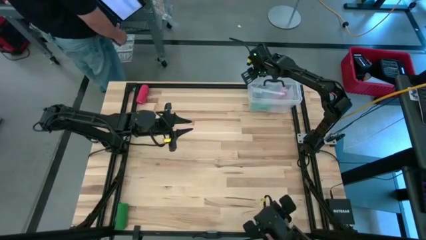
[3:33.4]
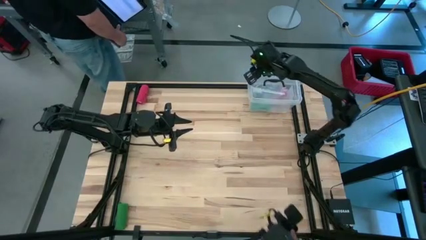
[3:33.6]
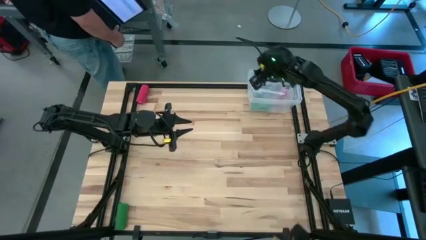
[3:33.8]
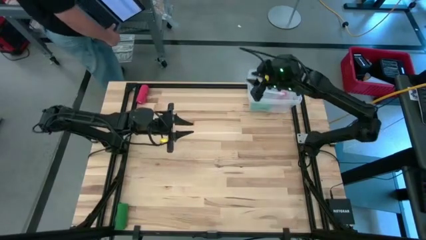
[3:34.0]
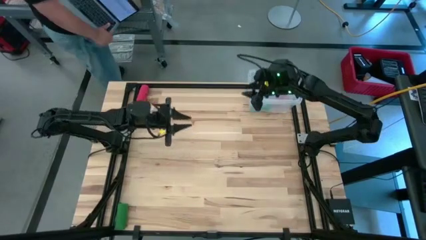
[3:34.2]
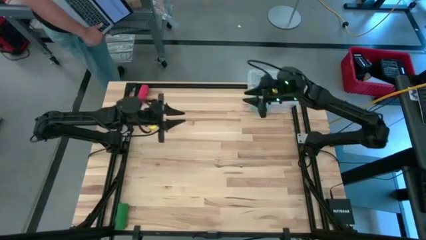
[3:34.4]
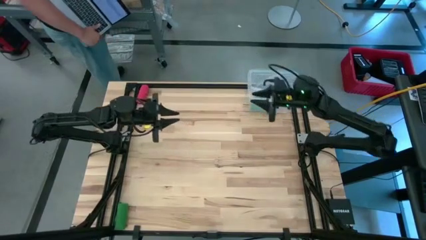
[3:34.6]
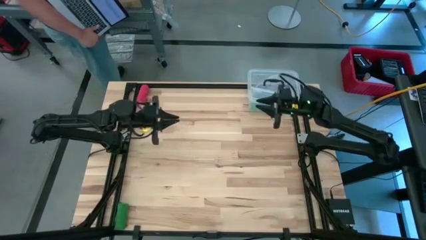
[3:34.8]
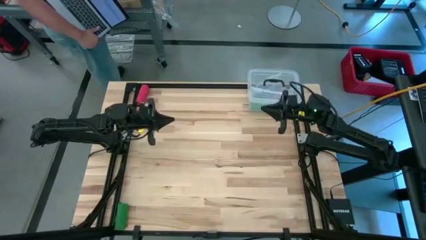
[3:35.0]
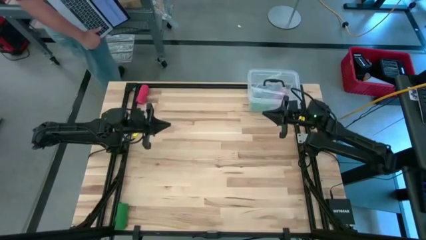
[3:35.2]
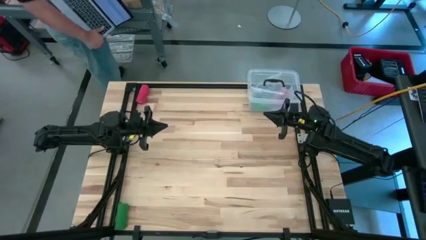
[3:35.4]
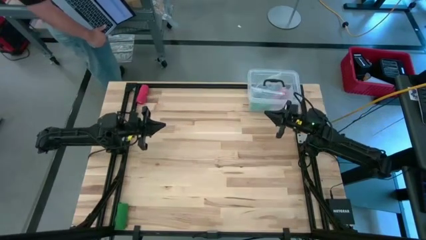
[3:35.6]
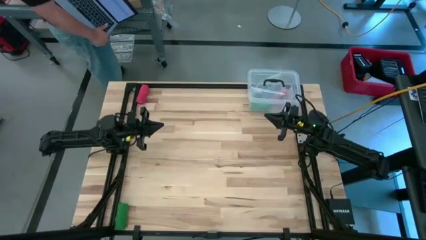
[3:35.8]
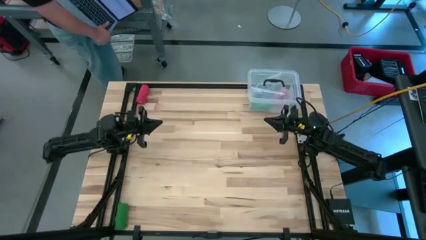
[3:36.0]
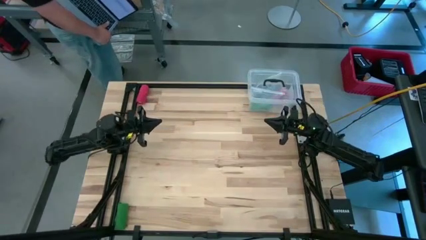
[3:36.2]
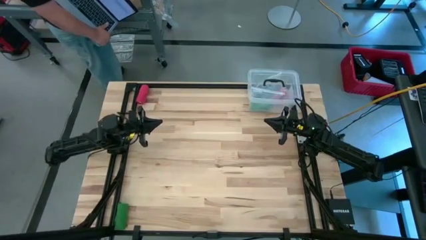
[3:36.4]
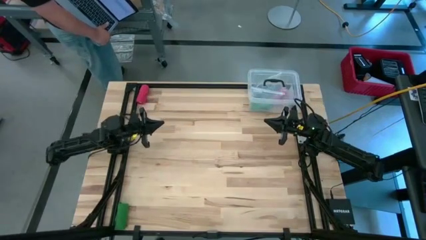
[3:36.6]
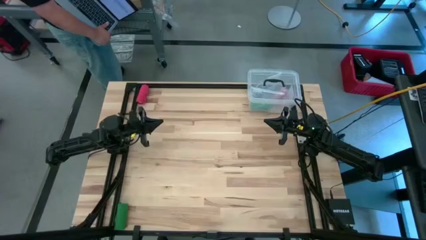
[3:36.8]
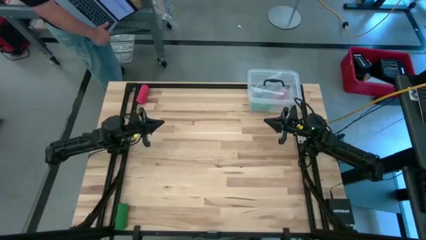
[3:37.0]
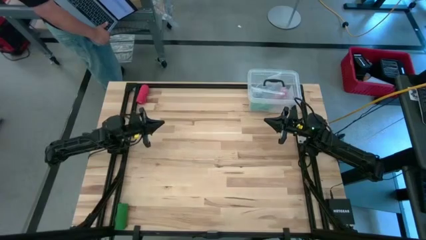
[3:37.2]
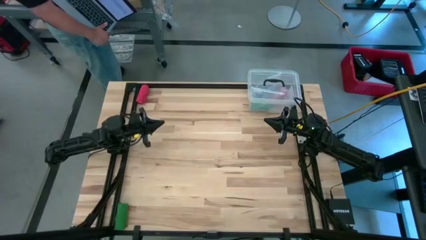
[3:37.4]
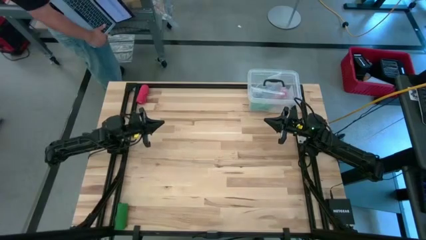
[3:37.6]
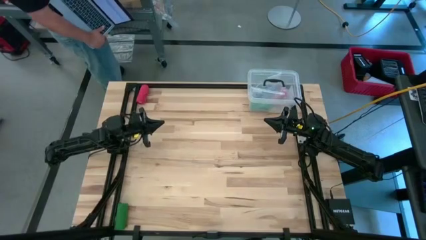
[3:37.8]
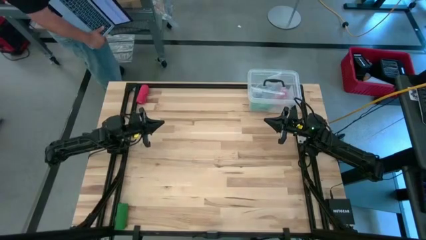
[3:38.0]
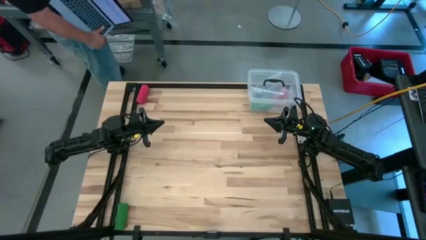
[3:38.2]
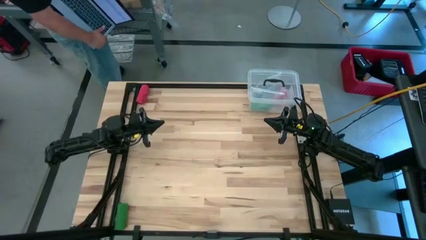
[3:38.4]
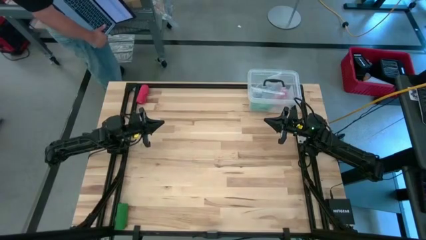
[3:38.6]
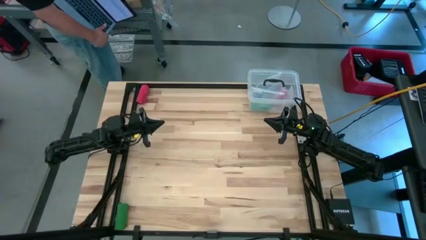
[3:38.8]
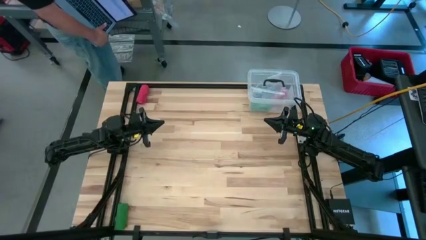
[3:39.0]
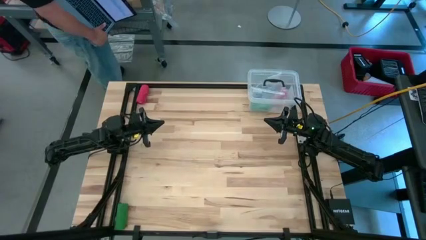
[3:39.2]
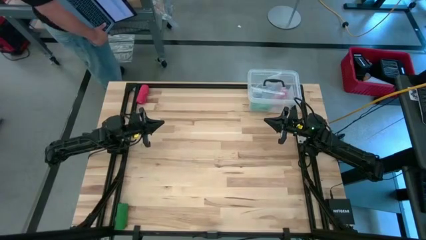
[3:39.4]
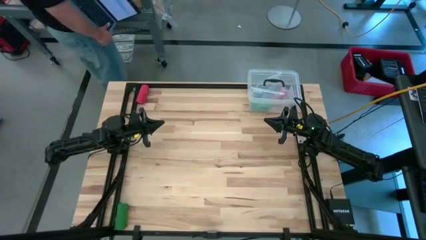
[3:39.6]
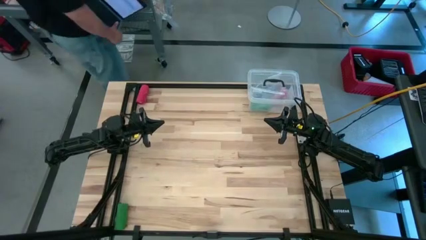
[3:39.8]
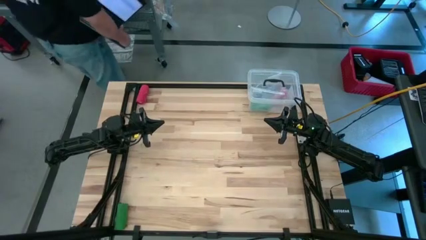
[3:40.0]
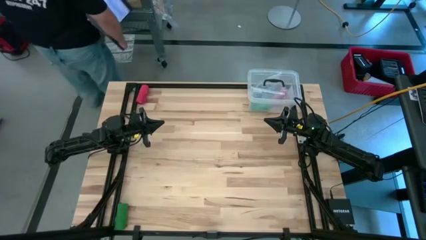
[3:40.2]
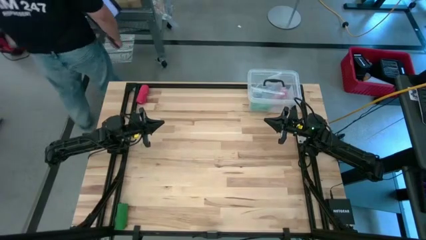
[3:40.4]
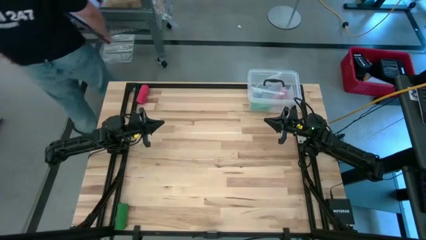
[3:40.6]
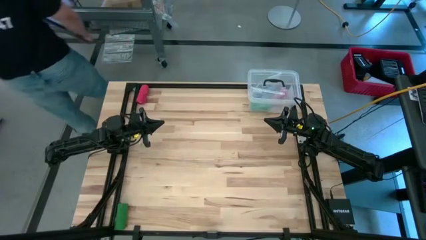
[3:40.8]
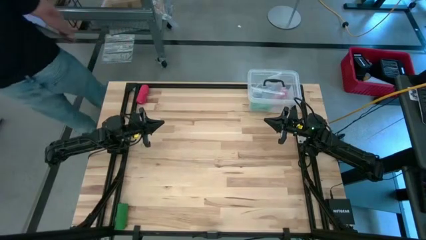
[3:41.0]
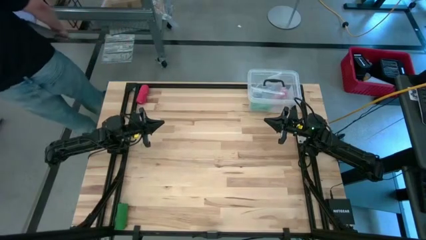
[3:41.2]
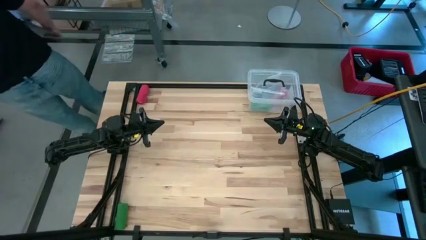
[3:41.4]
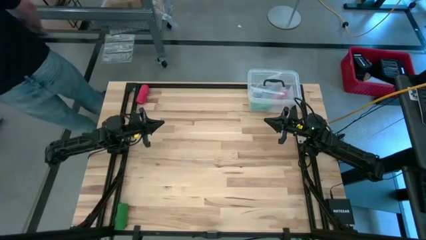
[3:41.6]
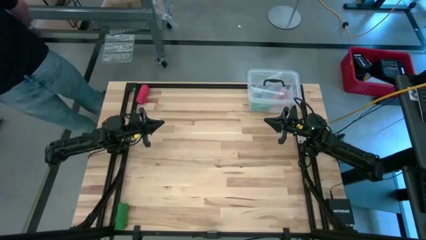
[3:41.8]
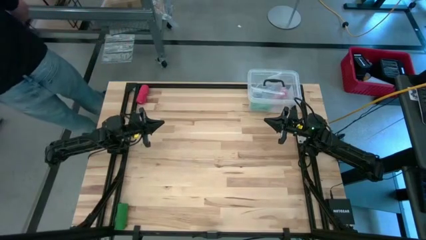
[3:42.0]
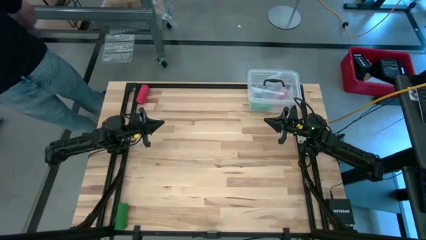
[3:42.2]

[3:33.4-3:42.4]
Task: Roll bandage
Return to Home Position

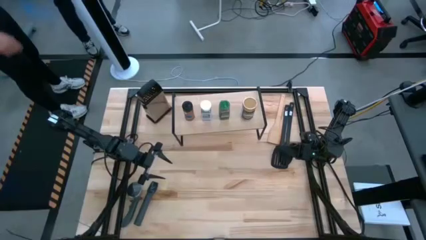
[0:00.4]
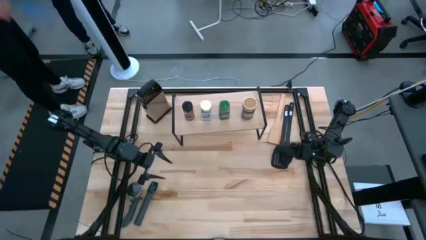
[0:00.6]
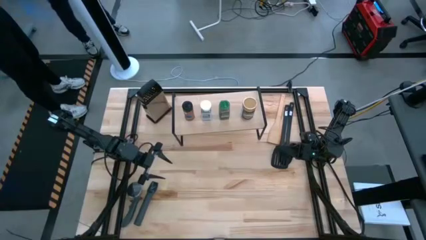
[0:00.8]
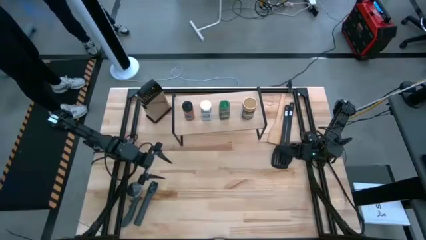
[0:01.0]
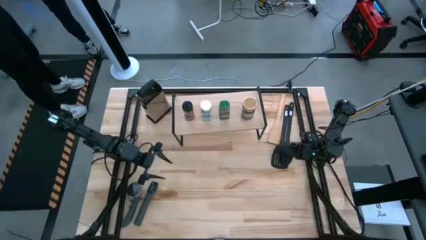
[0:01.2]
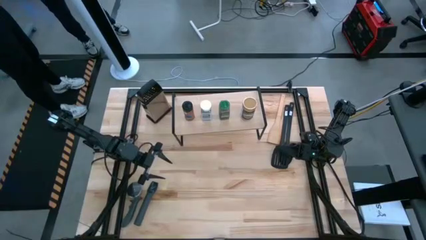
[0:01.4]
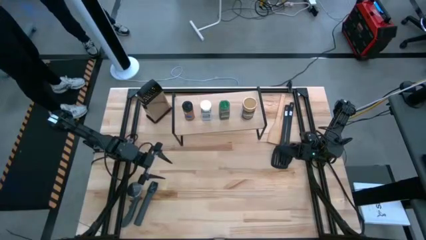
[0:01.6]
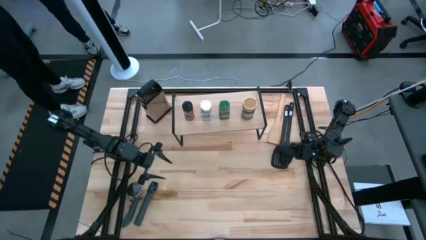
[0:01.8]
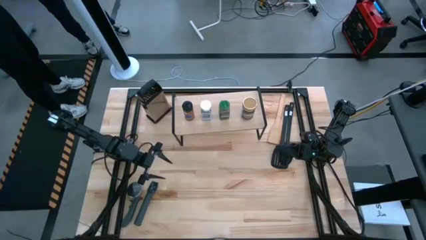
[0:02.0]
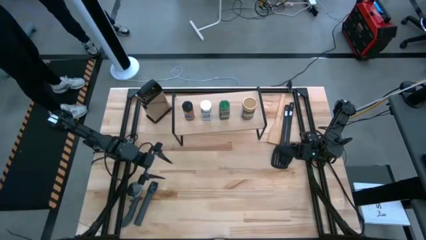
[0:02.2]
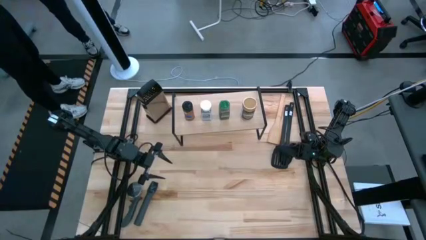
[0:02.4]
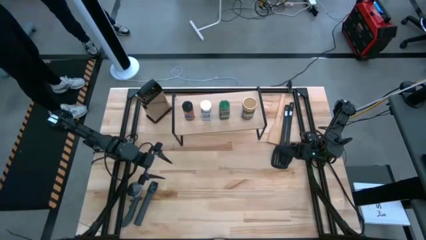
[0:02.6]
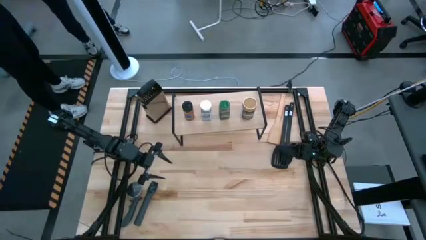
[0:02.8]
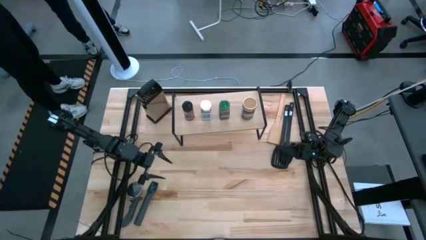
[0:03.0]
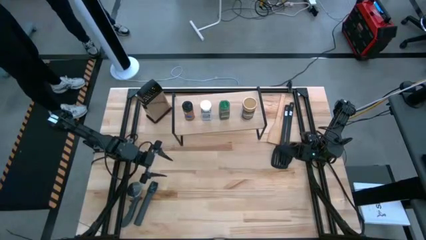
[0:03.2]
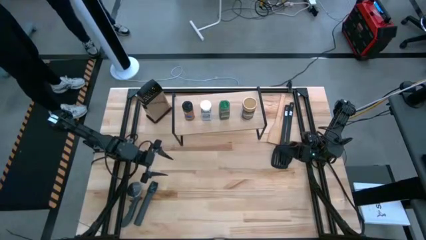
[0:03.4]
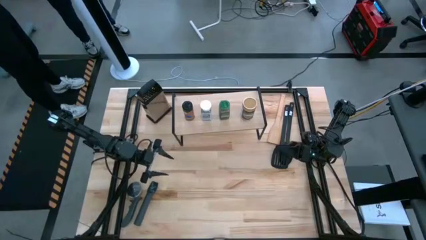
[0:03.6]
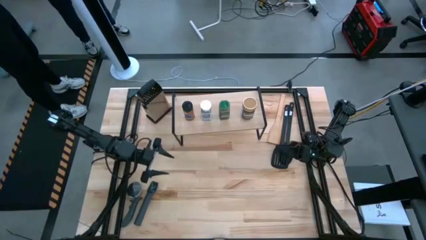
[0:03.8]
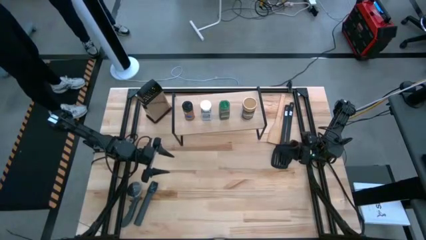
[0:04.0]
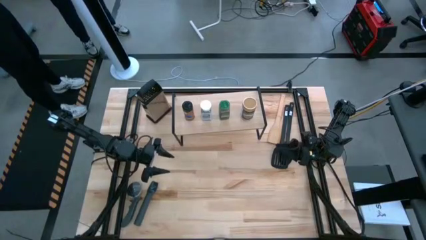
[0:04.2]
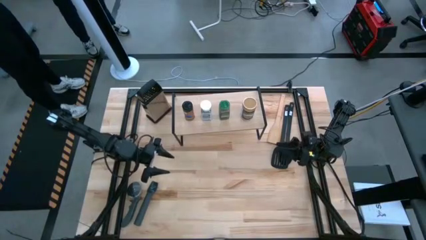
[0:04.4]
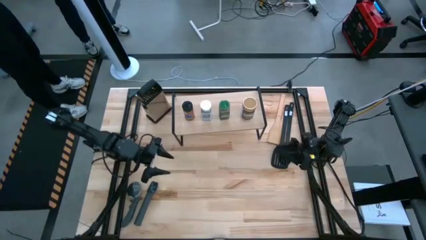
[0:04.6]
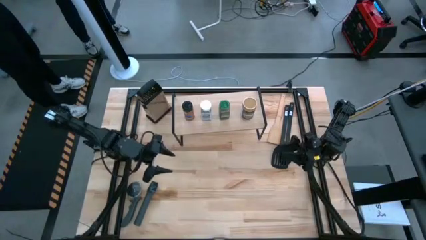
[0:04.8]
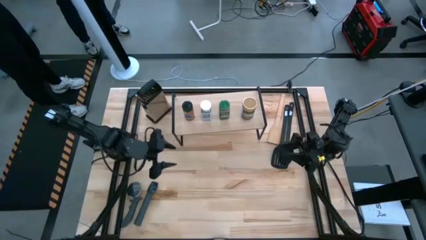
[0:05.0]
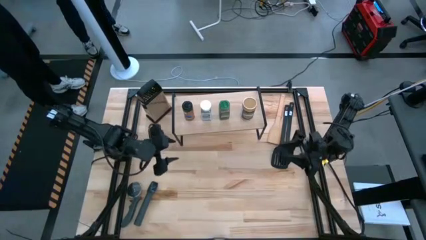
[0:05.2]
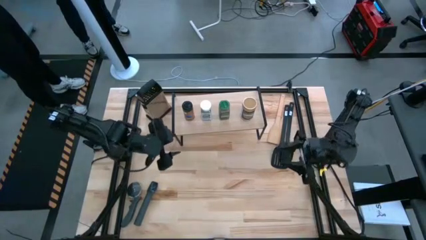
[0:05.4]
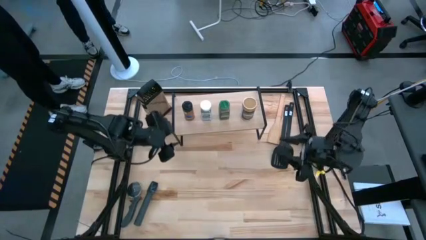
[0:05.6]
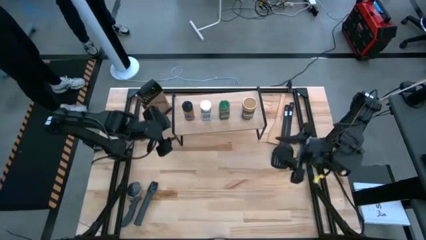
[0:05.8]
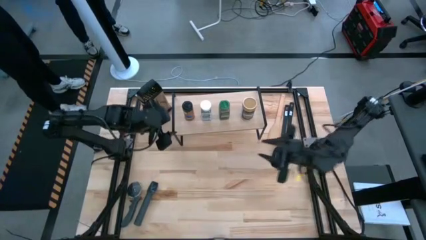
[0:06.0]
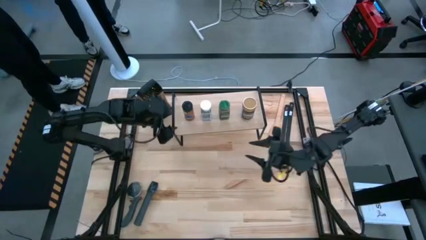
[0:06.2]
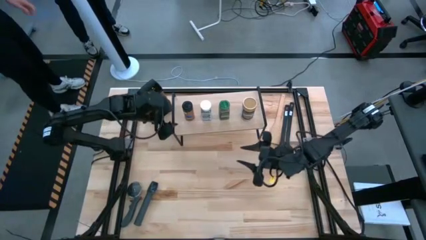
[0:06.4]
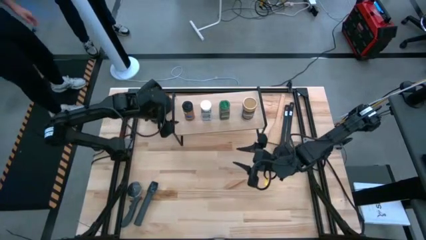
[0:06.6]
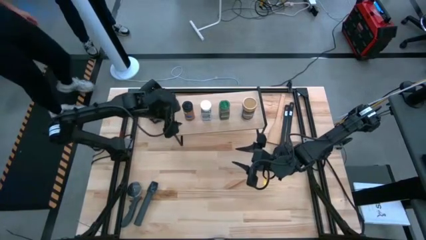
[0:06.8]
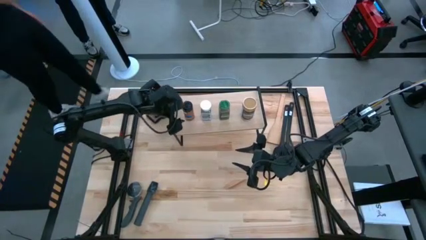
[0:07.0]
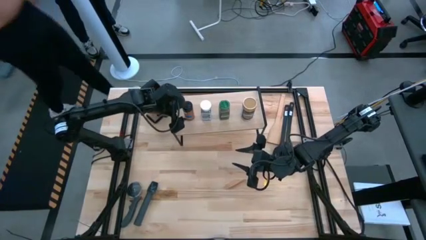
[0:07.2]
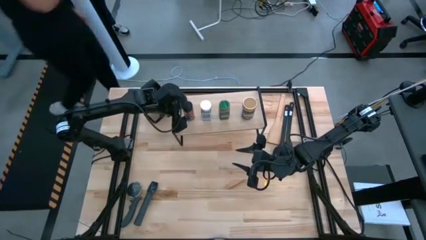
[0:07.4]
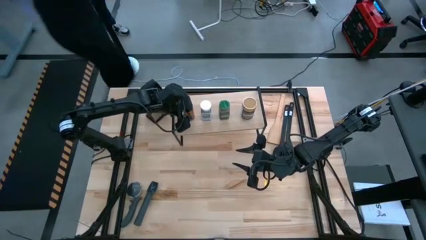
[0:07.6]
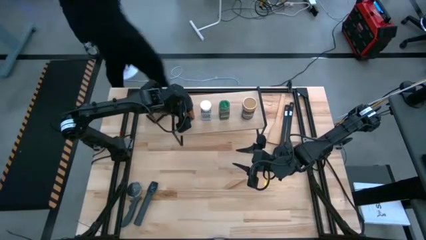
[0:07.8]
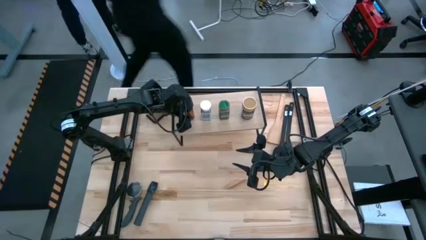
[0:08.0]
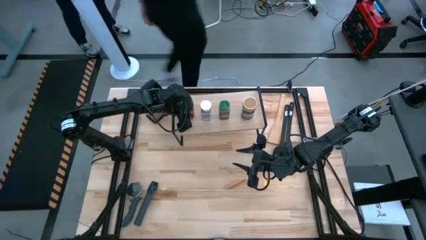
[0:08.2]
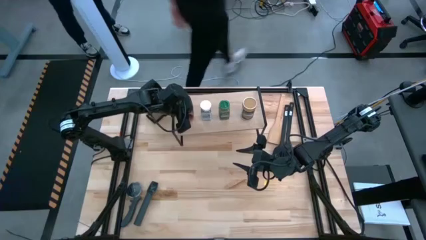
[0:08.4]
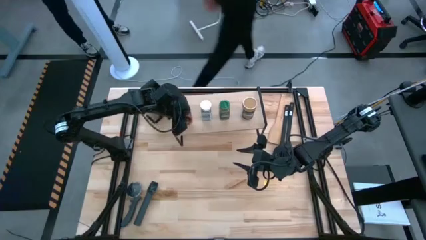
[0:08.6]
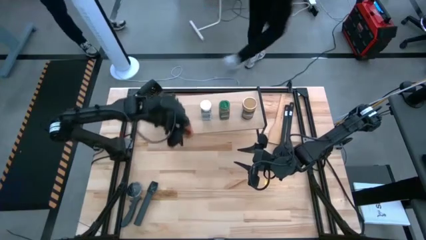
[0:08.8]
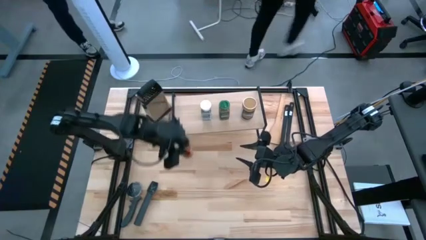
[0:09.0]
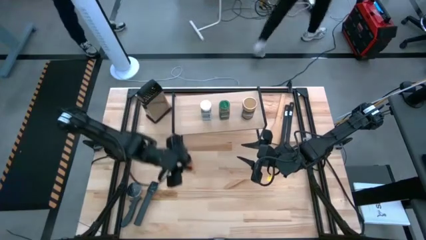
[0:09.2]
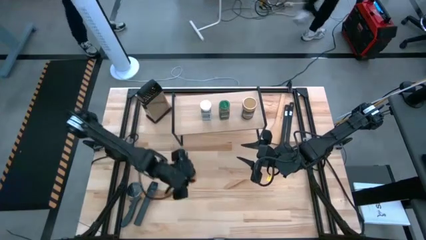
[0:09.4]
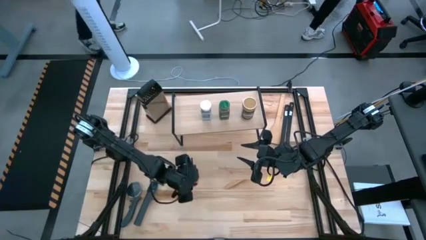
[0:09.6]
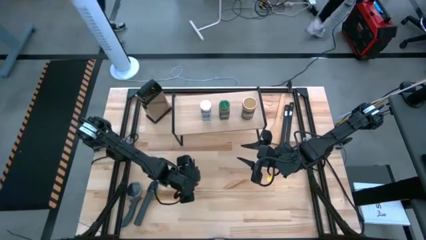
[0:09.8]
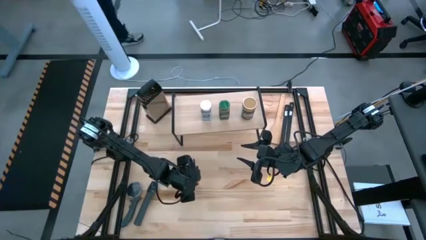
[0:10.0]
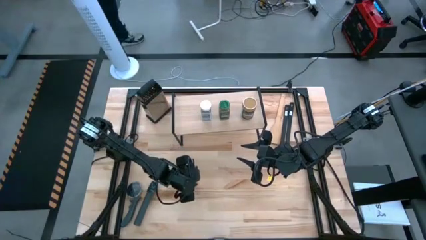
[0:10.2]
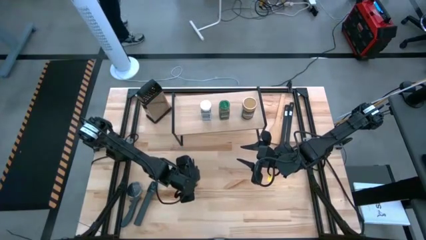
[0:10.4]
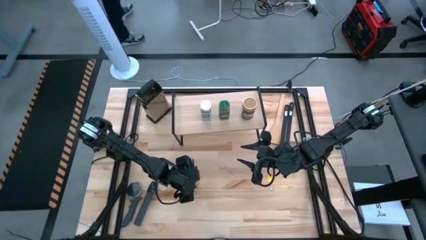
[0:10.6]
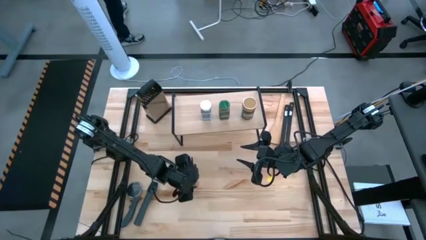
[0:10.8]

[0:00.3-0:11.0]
Task: Shelf spices
Remove the black seasoning bottle from the shelf
